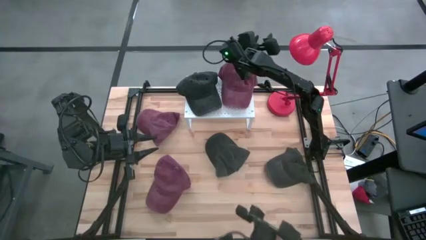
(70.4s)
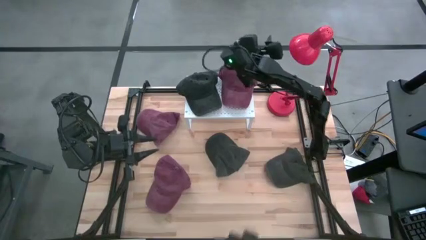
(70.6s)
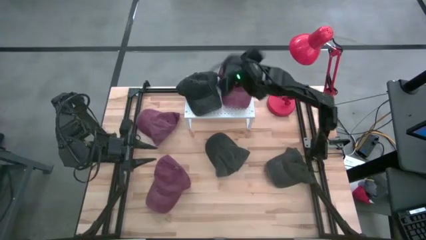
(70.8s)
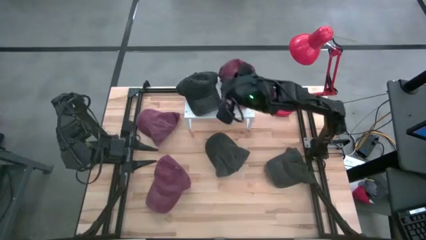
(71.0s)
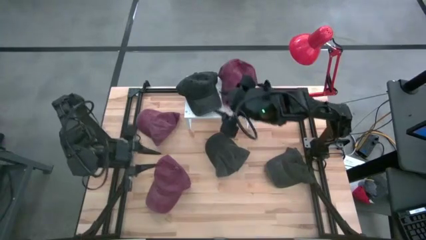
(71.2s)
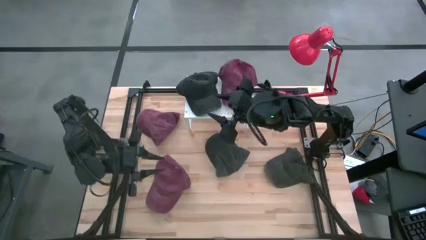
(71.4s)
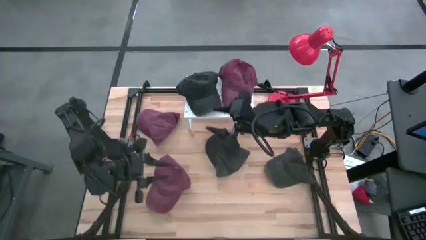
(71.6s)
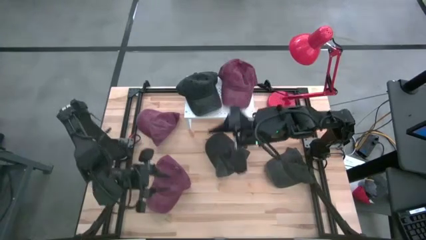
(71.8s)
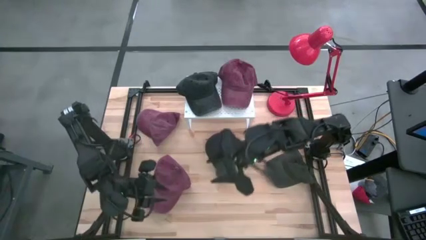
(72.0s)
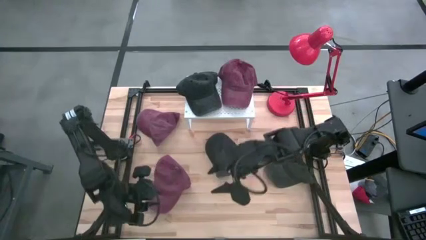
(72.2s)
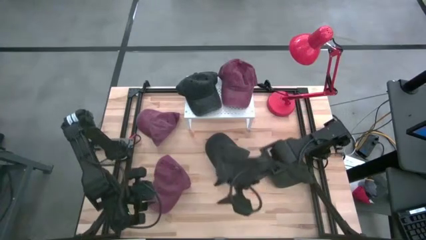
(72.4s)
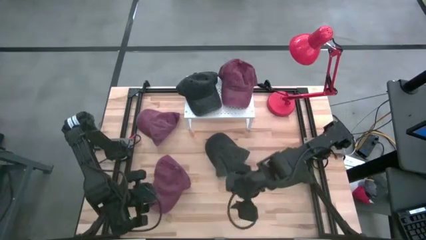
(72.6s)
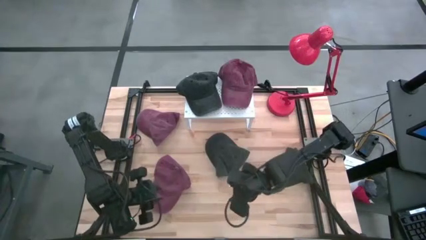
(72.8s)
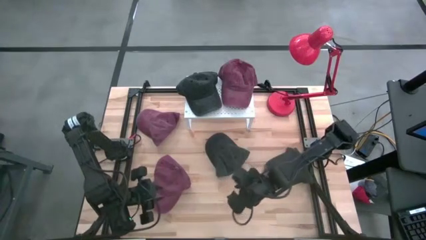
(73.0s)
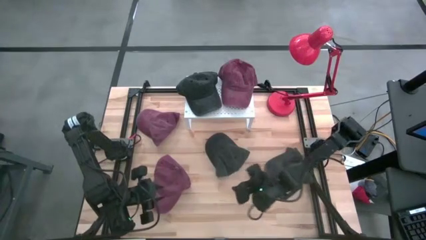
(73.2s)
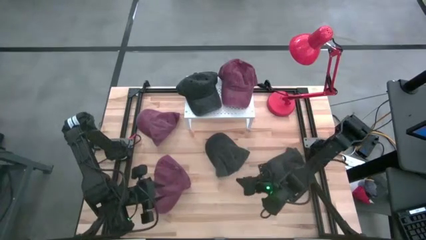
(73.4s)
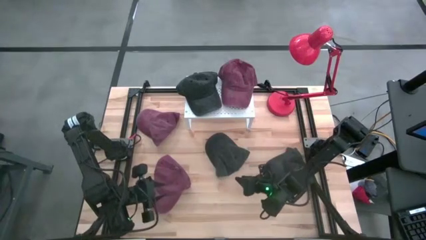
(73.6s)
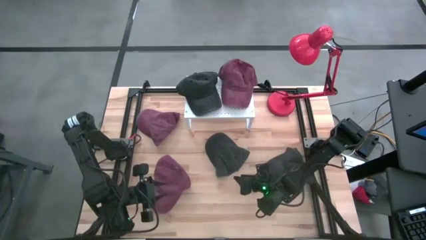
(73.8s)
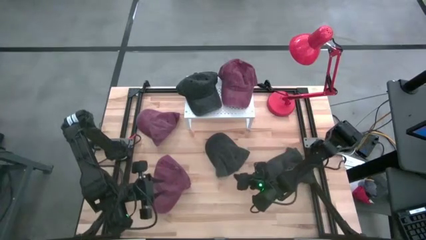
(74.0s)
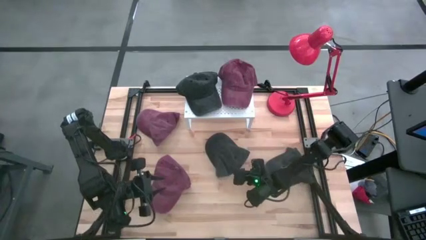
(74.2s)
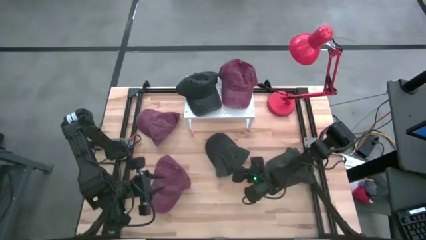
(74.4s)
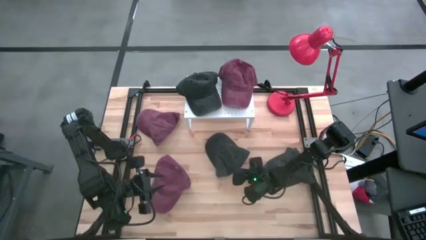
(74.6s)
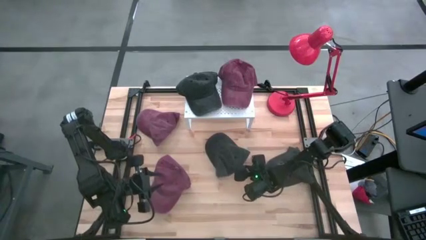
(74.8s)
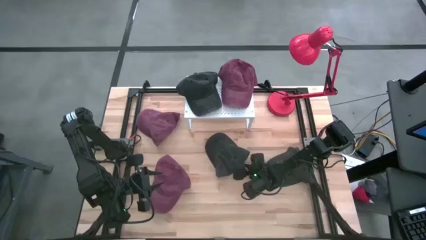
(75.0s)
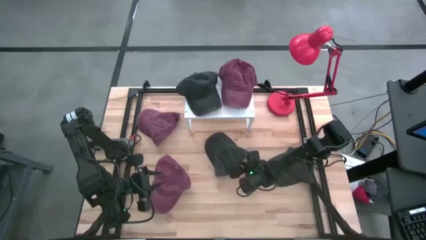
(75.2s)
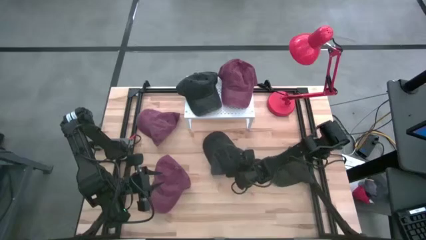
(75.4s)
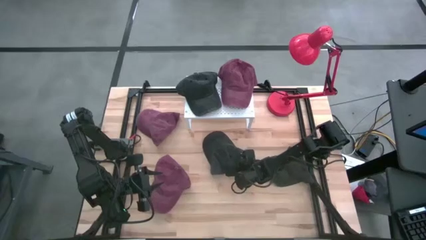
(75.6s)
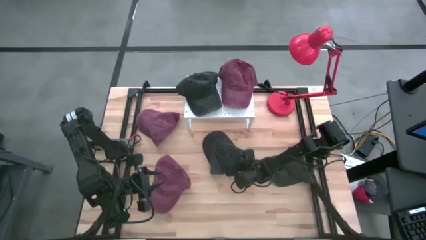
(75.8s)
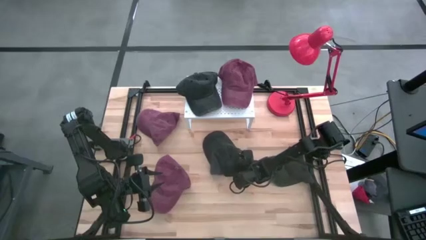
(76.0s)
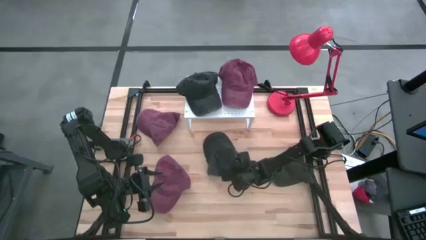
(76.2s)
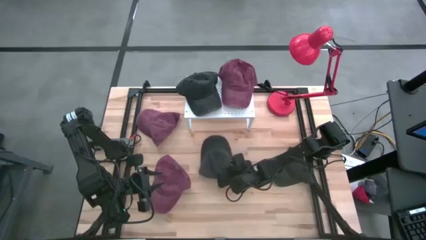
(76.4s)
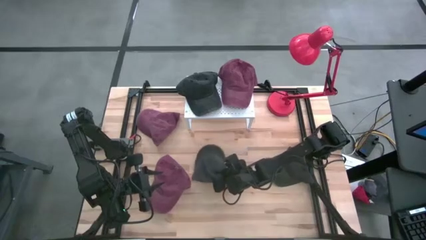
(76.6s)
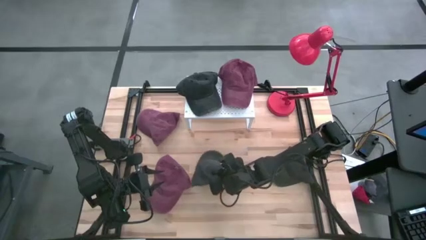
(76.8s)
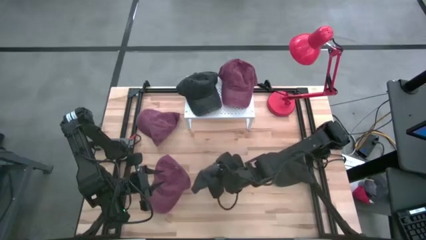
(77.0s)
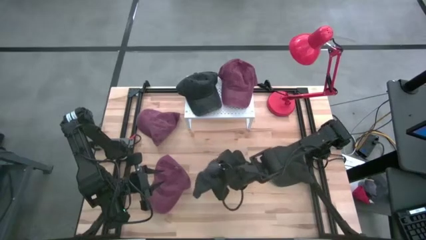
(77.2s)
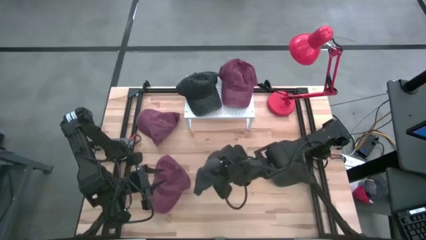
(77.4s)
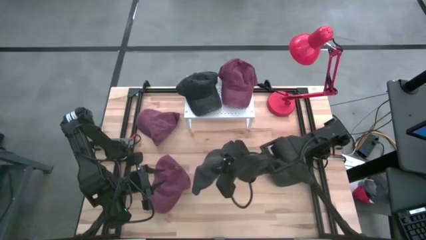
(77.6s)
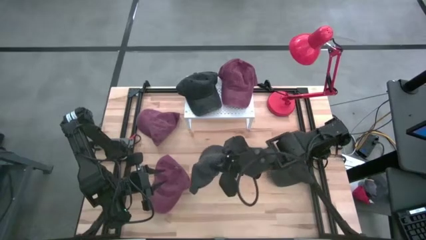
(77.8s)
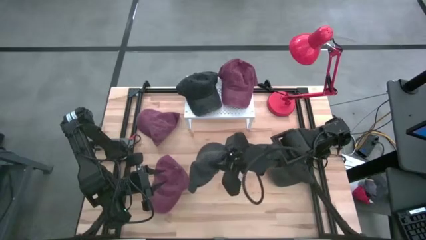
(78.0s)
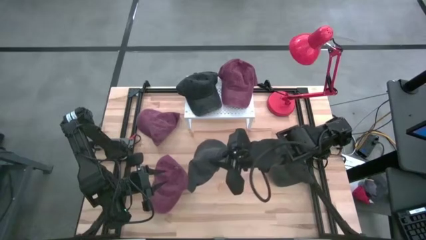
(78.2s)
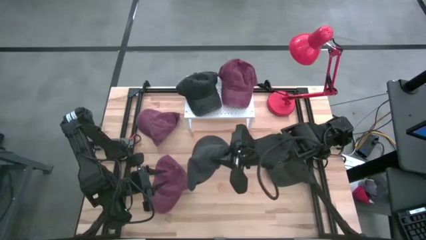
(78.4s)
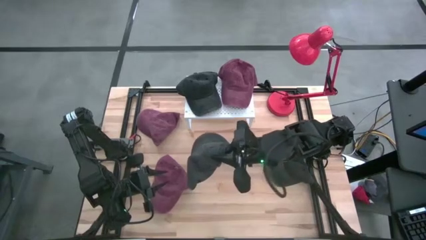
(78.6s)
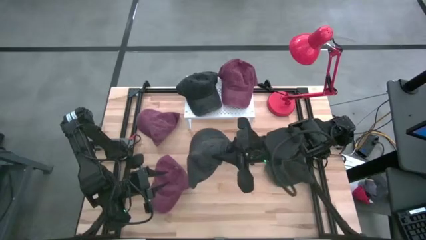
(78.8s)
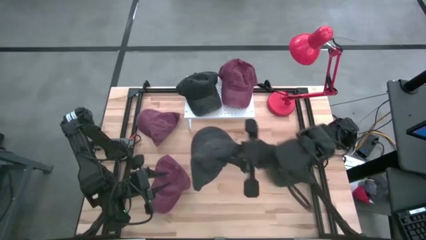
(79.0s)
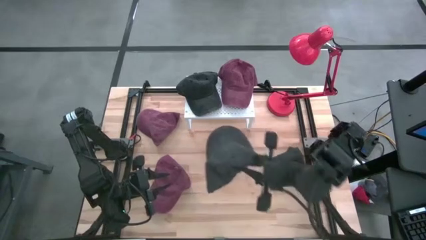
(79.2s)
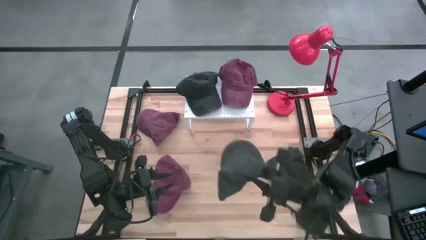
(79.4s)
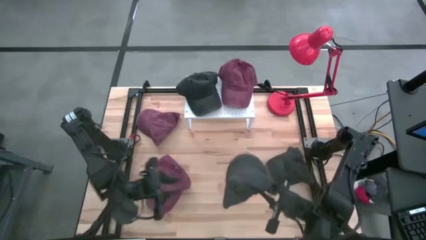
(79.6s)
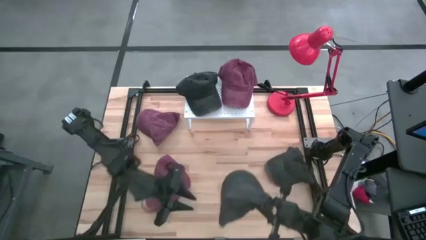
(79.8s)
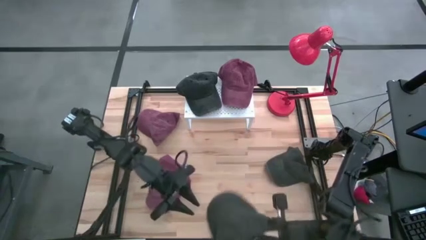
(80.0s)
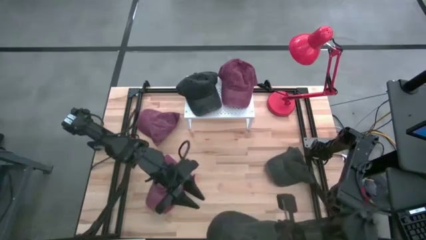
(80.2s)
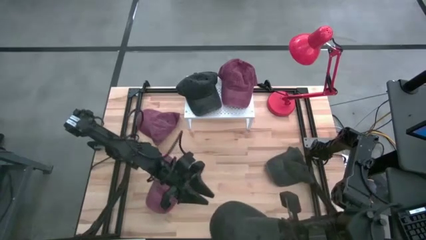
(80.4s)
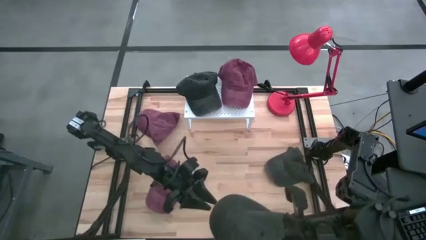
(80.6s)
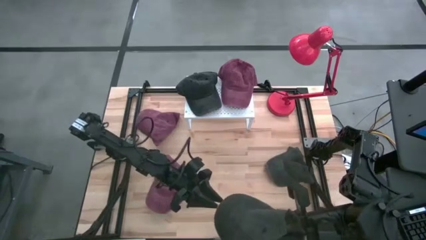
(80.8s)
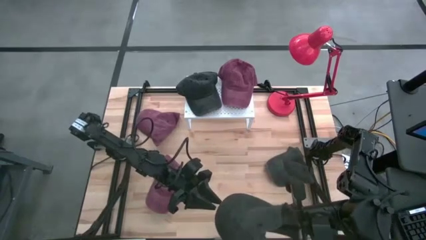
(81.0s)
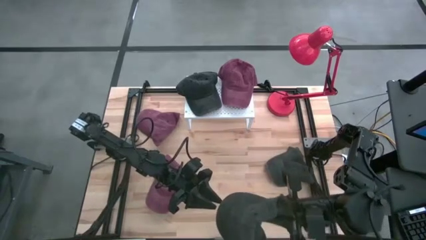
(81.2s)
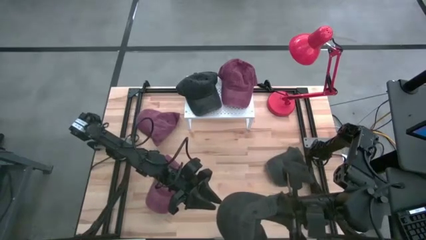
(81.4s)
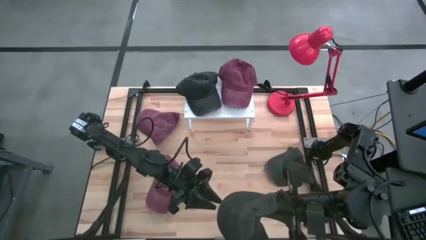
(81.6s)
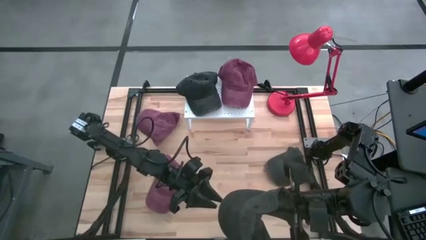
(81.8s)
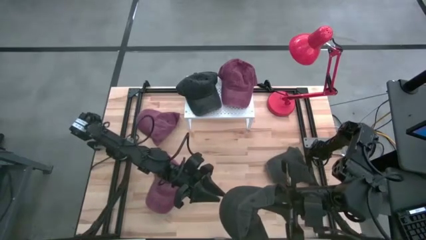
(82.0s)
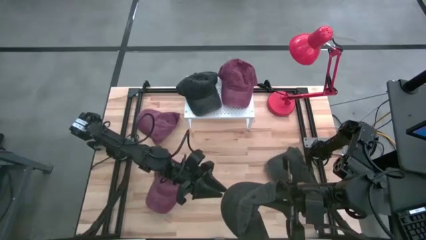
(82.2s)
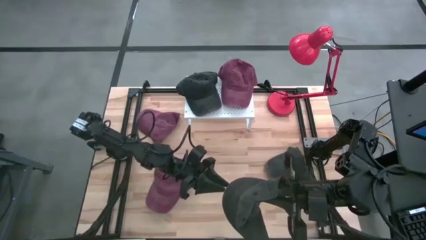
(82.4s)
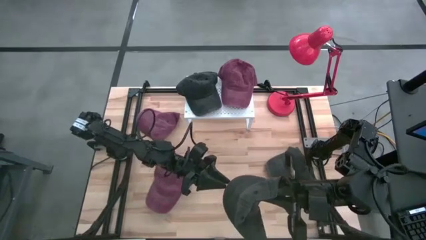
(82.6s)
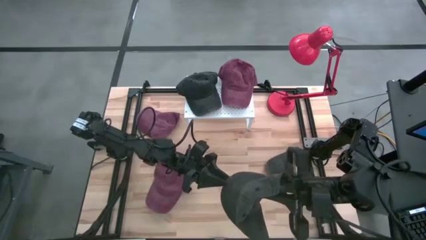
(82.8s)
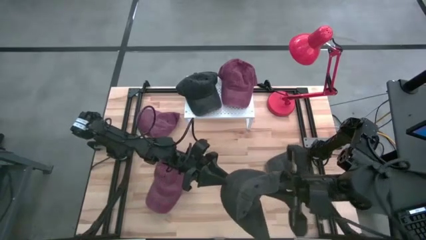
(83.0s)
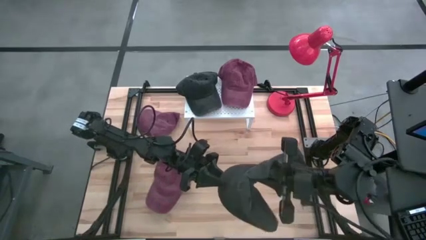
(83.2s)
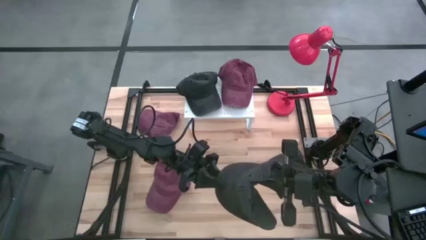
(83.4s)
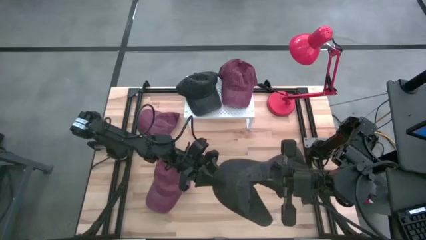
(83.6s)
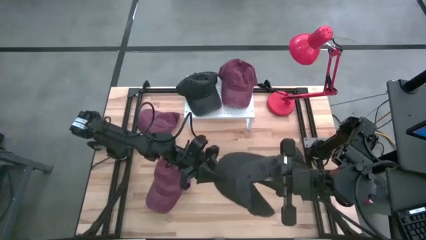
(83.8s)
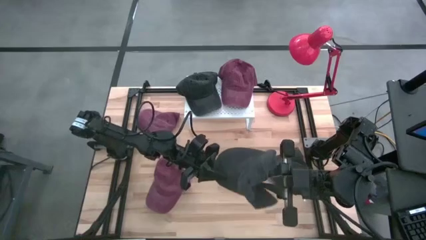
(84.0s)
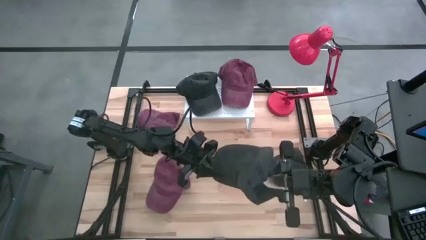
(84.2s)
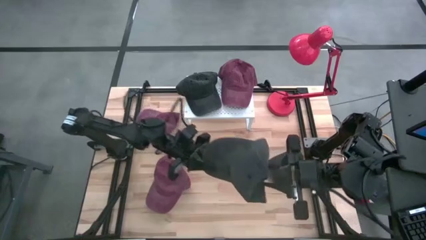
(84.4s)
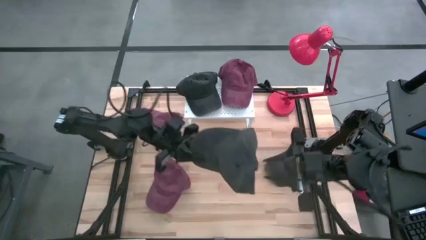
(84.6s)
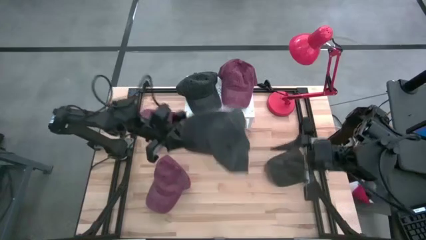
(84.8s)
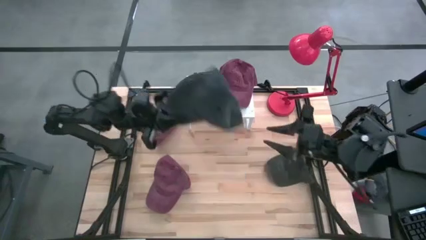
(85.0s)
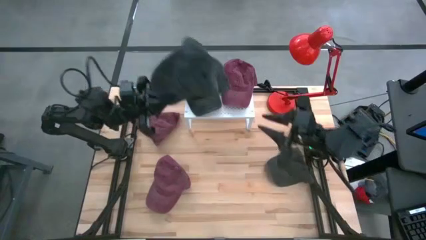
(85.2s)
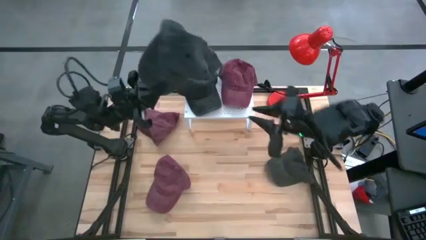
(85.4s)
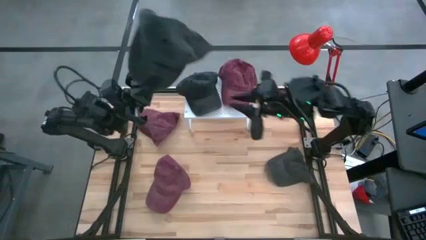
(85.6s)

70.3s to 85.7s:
Task: Pick & Place hat
Stack the left black cap on top of the black cap on the shelf
